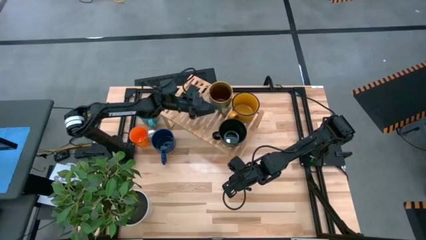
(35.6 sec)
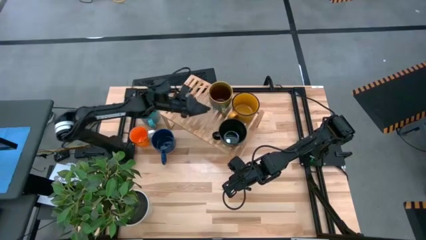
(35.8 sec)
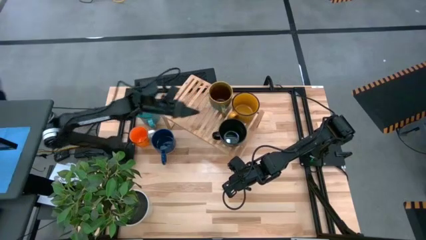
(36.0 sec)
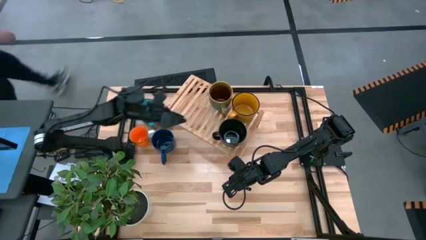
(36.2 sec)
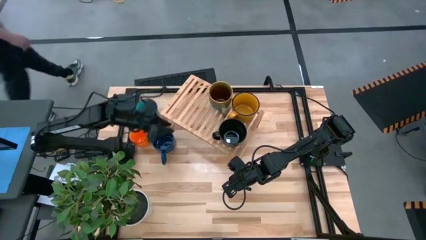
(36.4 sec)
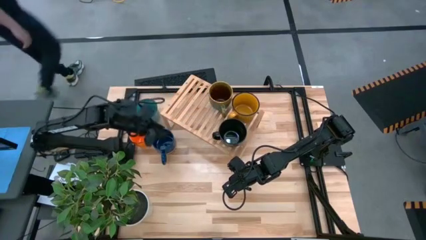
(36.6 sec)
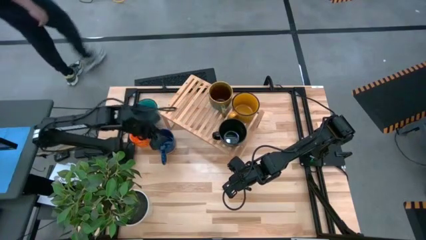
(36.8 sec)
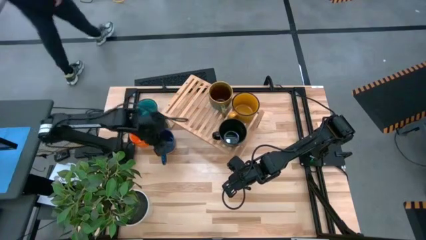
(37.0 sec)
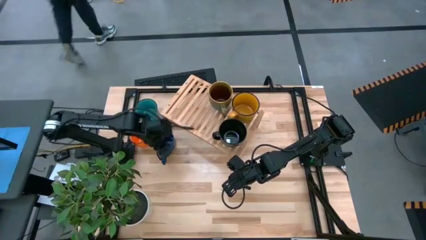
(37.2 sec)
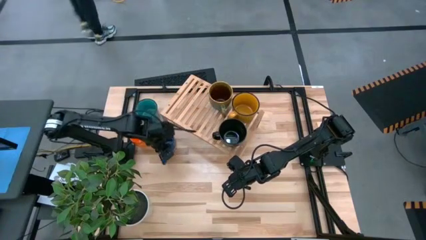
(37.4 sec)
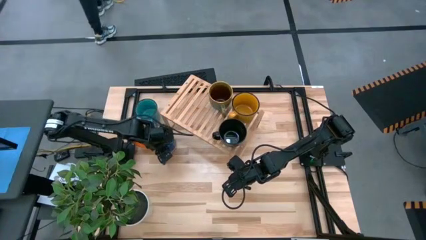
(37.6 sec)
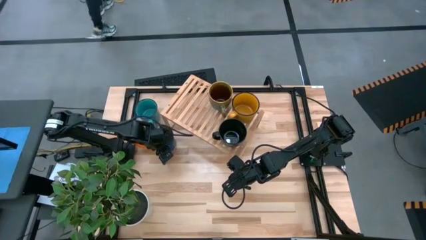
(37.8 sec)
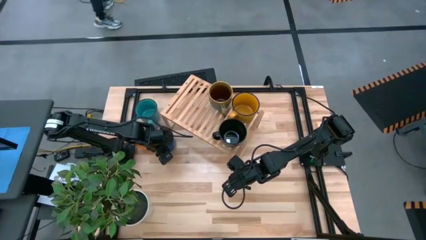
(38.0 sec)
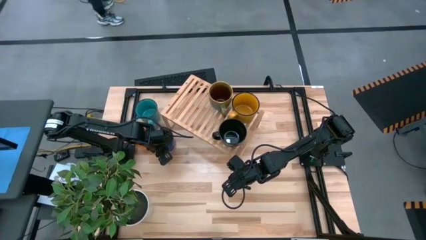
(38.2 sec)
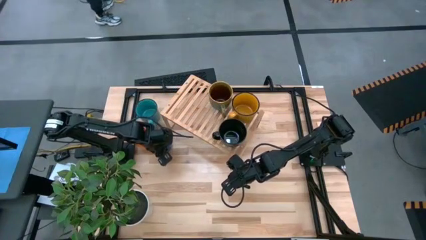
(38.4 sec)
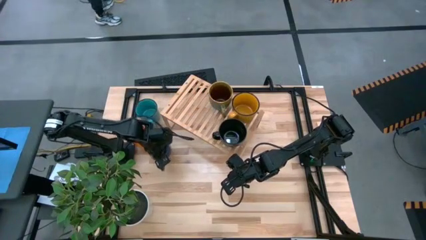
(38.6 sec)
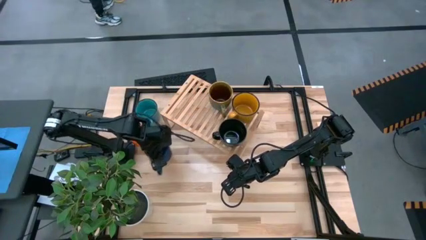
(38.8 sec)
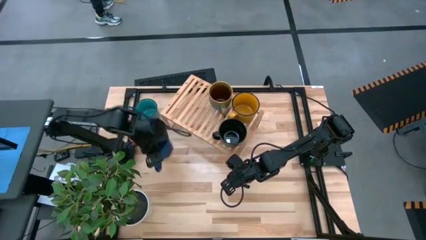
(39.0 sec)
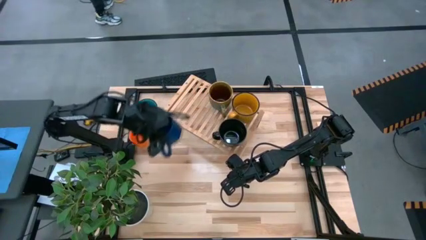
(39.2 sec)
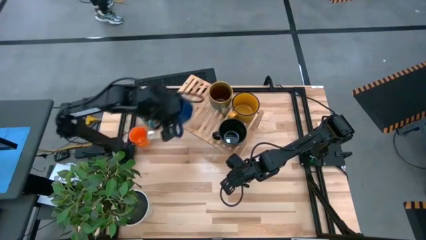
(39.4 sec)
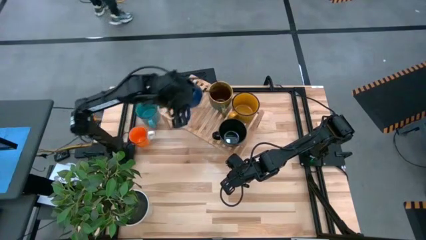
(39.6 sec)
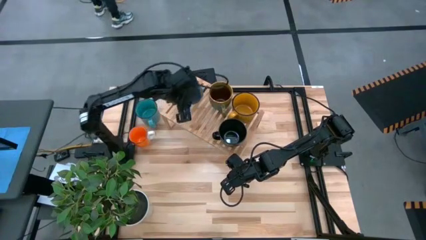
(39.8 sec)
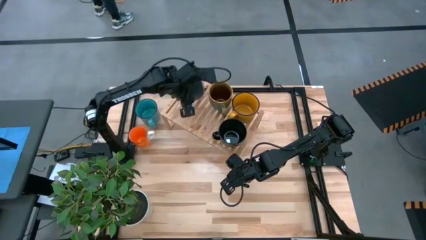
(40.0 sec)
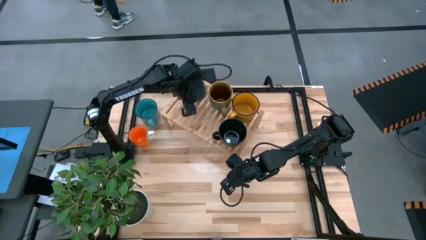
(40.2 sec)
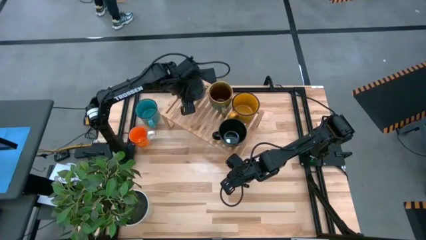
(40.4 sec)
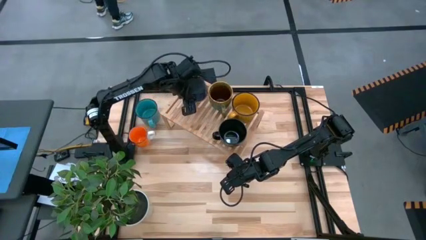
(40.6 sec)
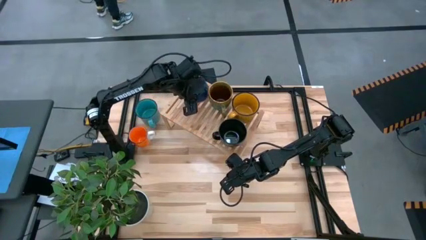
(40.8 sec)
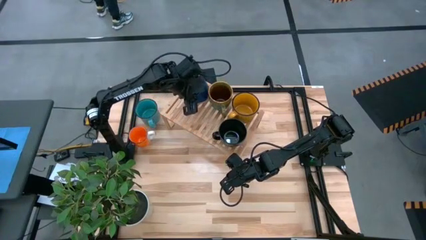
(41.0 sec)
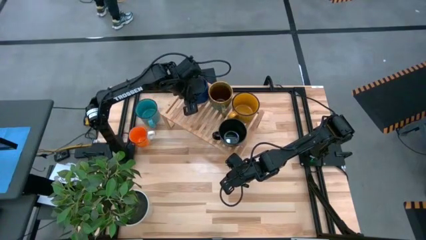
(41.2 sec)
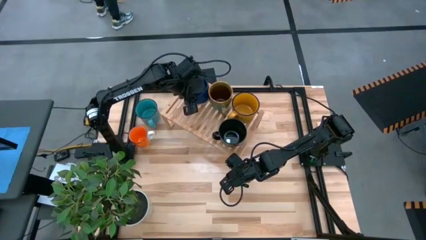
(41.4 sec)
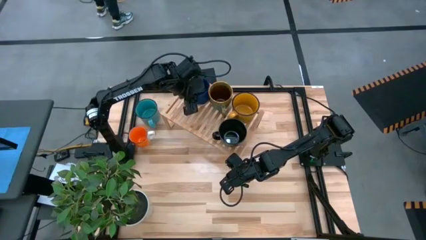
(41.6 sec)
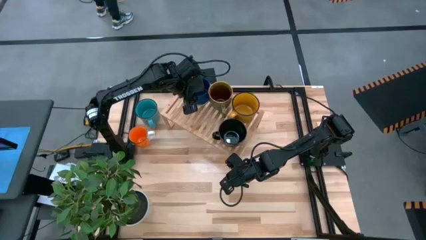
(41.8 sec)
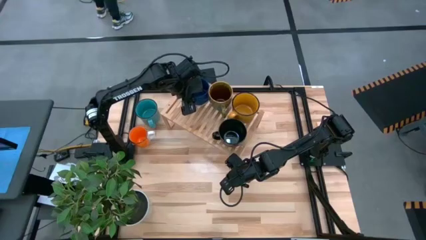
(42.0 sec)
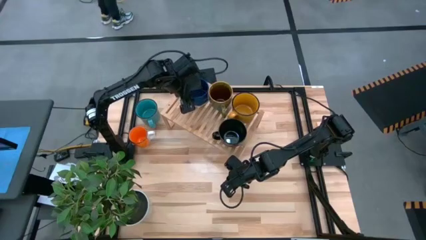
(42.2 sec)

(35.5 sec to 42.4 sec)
Task: Place coffee mugs
Put the blue mug on the shelf

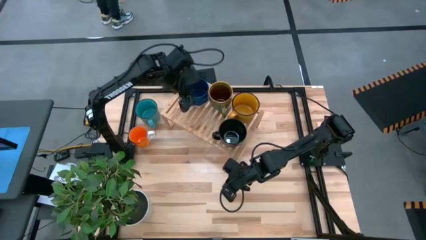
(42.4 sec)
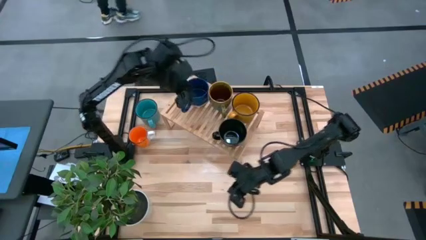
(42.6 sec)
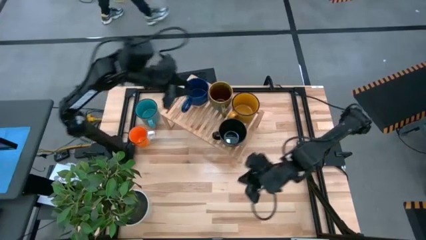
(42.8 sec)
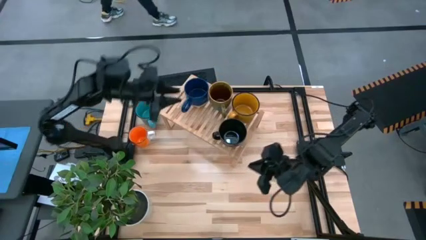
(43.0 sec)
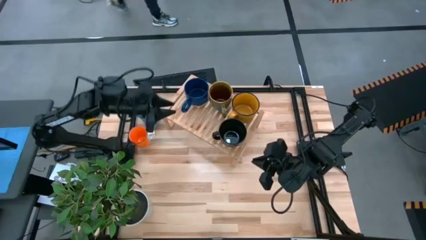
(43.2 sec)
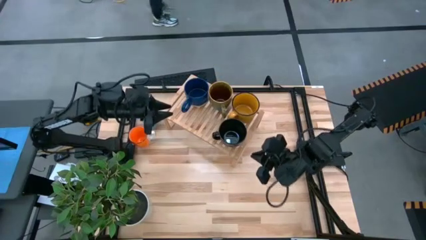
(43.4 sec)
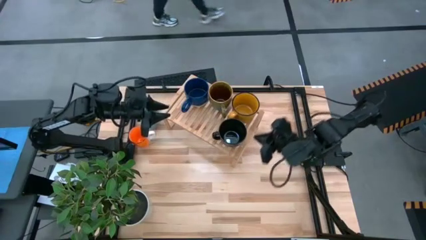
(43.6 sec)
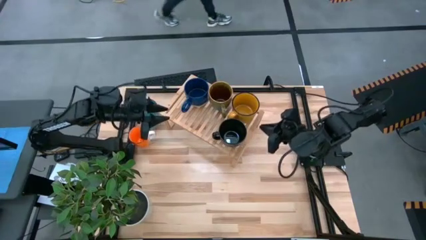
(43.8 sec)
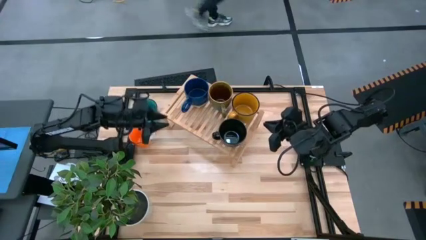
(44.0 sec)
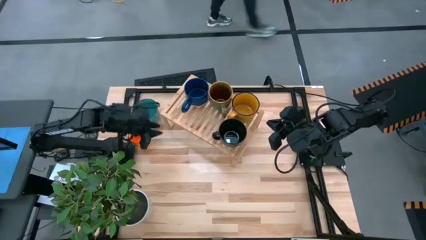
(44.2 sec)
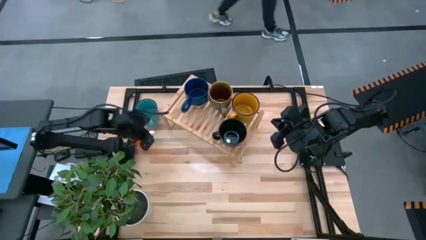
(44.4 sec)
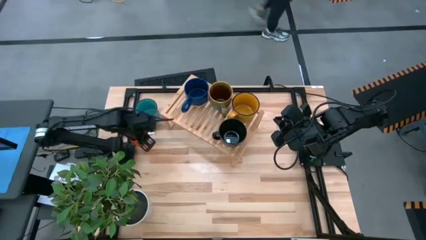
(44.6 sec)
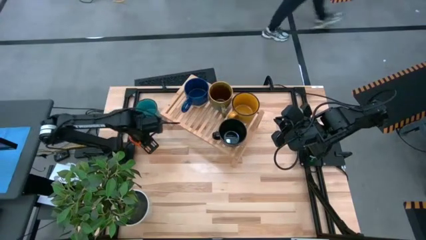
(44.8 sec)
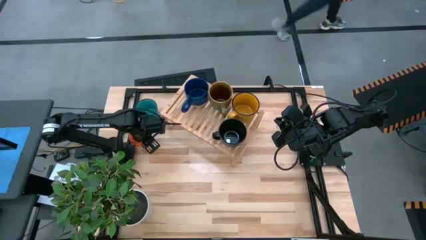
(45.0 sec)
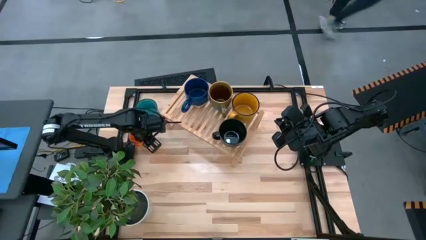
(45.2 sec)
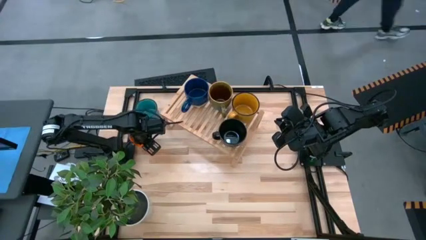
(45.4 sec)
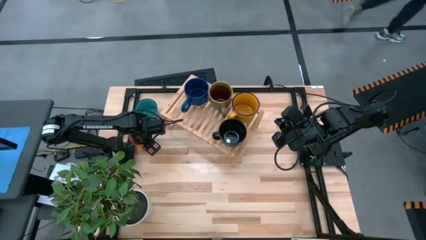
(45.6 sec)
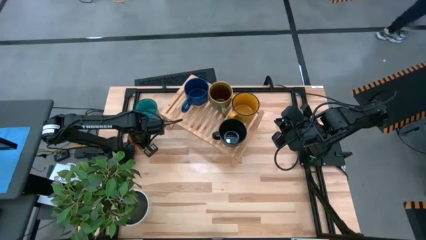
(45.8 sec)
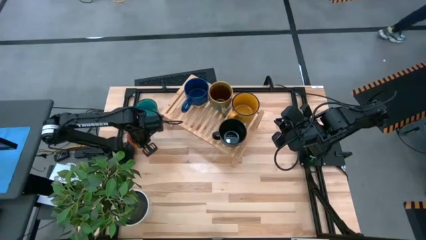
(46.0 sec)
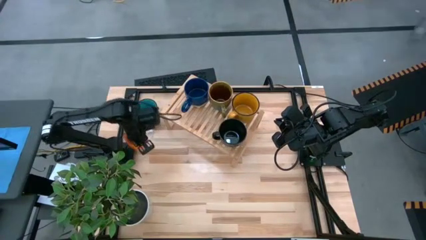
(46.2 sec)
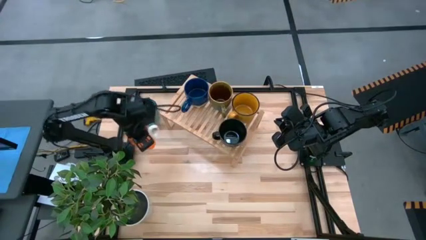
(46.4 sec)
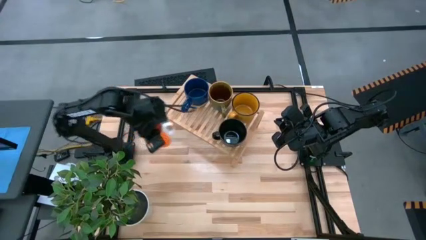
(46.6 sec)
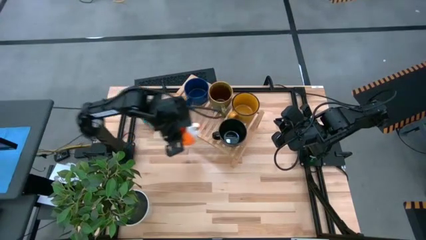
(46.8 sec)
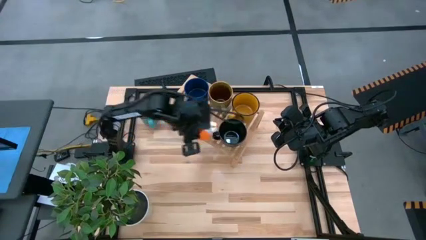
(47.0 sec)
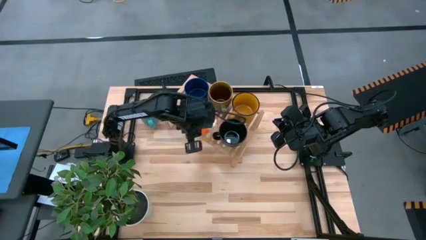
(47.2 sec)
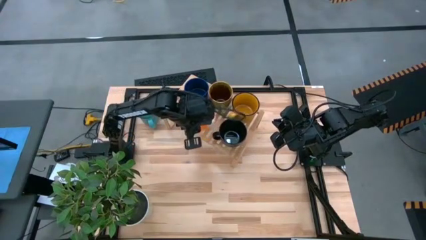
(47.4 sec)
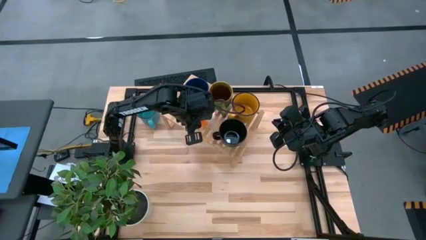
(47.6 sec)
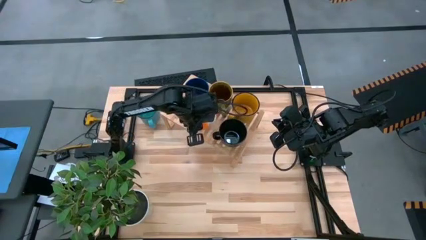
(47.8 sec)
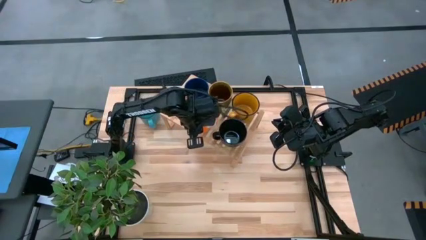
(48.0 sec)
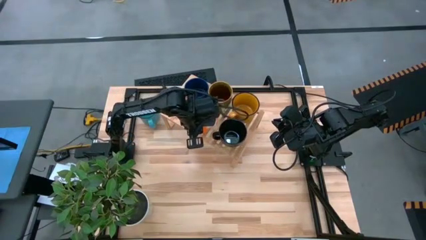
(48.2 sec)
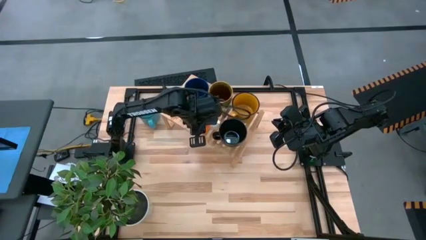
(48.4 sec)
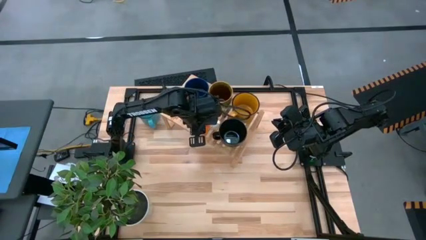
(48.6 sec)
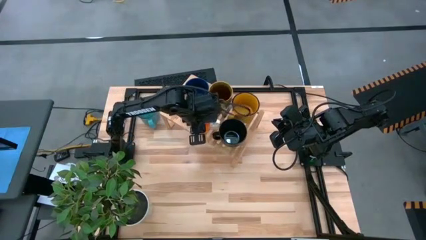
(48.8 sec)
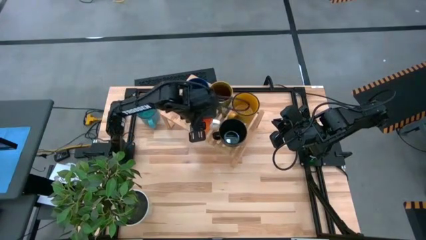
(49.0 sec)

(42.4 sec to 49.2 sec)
Put the orange mug on the shelf

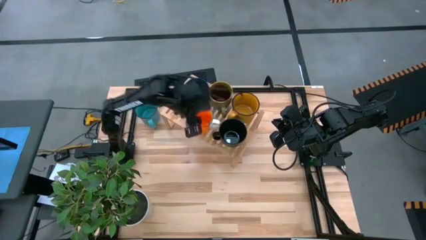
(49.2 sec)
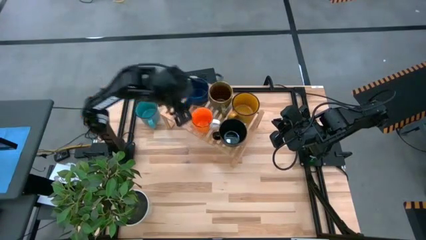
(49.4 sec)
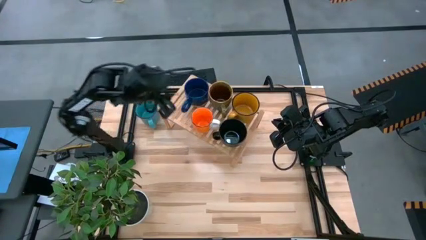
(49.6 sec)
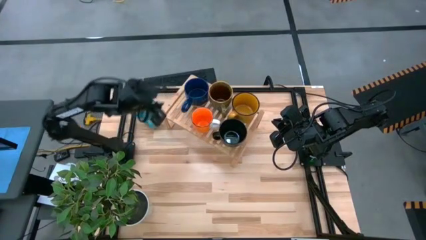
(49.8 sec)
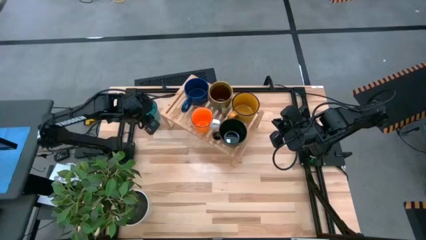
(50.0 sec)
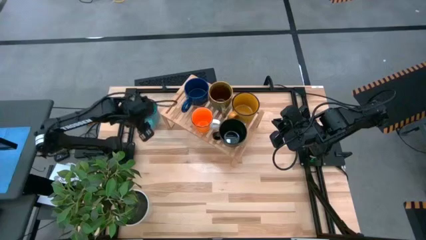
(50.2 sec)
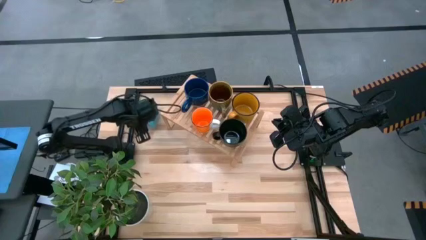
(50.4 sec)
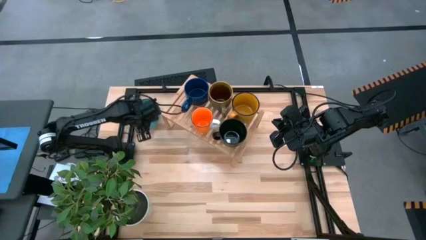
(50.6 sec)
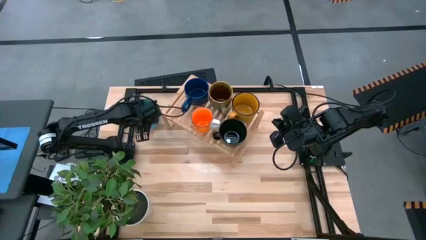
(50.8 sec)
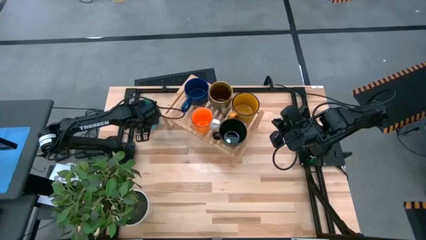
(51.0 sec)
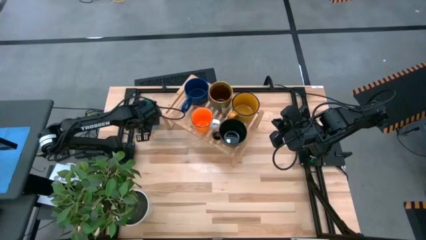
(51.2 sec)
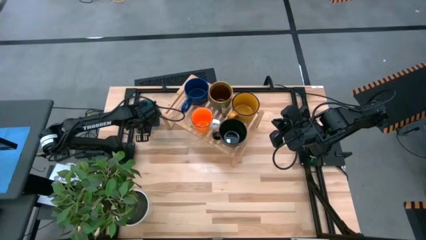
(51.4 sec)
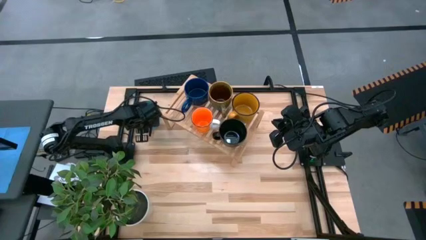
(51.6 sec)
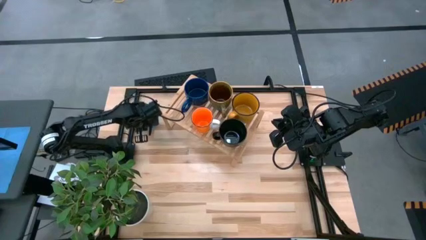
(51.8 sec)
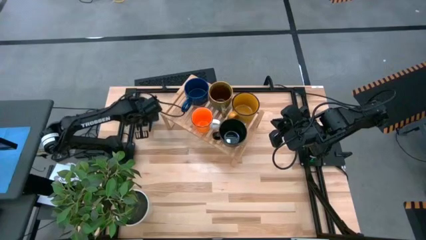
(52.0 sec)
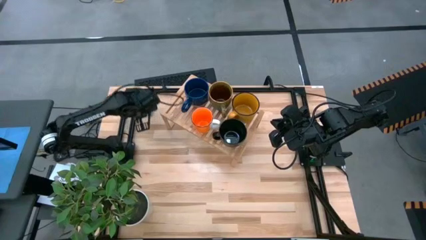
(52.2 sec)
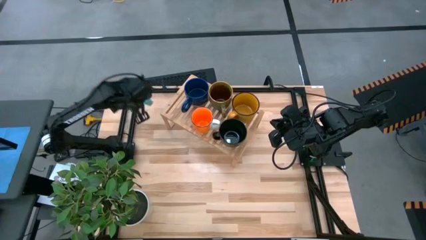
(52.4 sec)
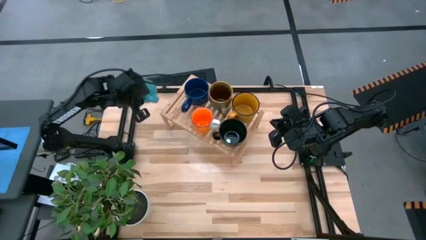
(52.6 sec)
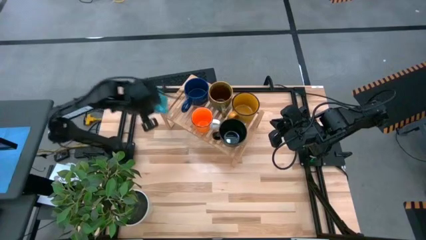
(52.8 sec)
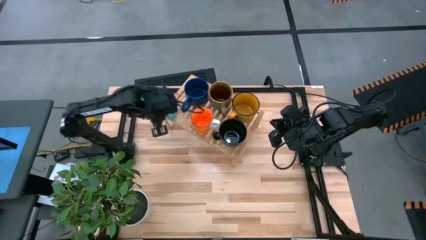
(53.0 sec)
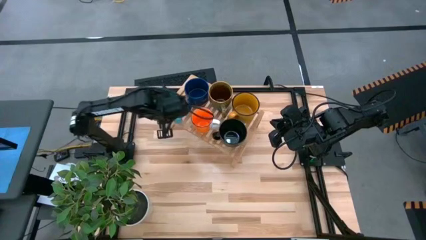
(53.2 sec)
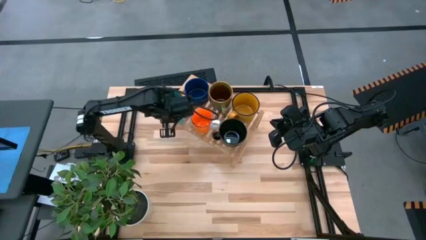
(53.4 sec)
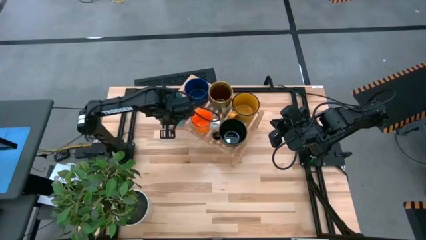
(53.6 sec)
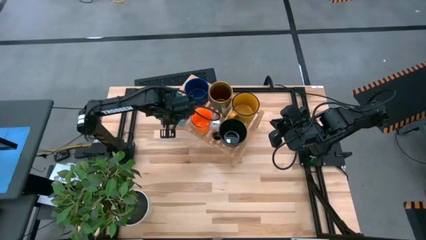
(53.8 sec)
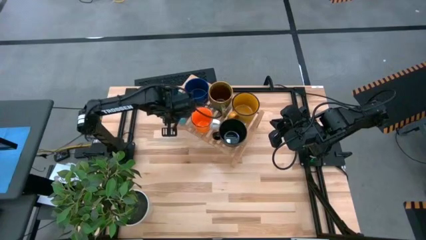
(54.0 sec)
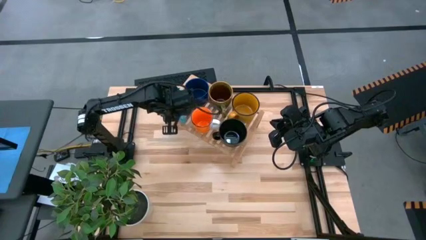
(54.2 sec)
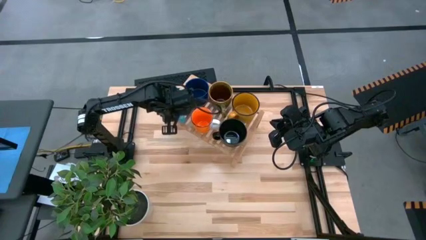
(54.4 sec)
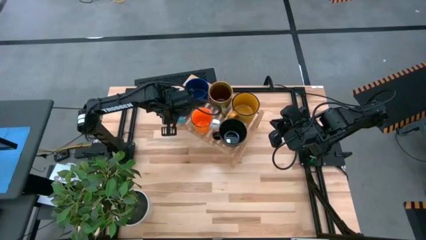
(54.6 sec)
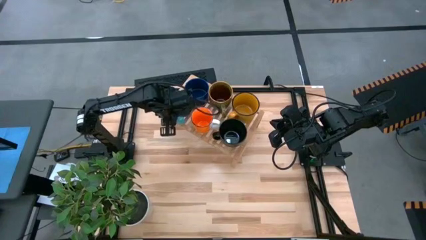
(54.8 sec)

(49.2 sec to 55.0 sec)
Put the light blue mug on the shelf
